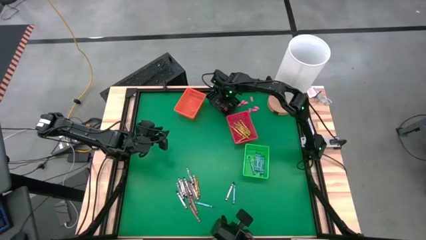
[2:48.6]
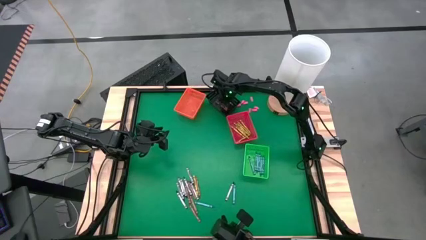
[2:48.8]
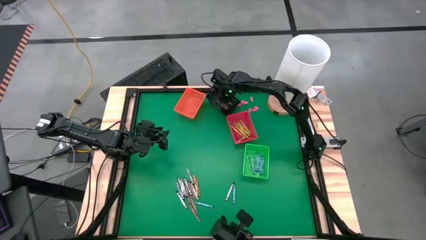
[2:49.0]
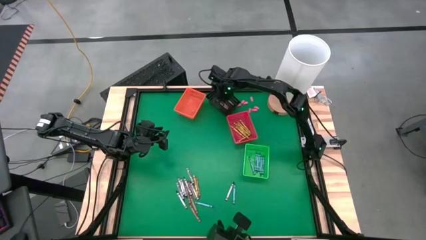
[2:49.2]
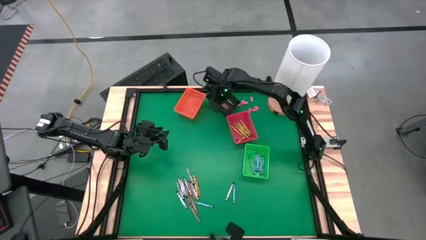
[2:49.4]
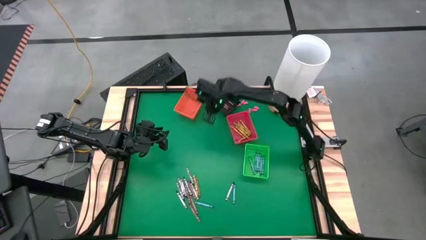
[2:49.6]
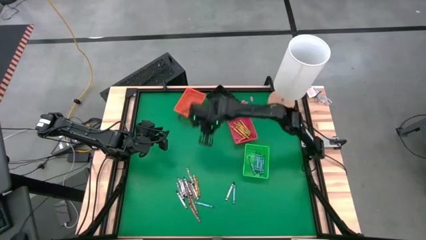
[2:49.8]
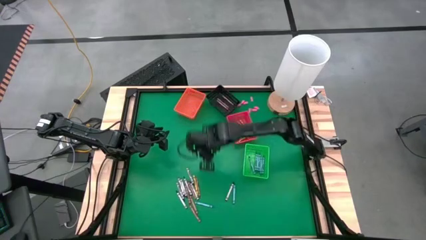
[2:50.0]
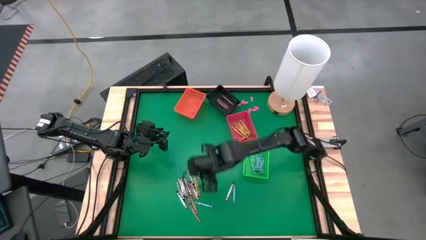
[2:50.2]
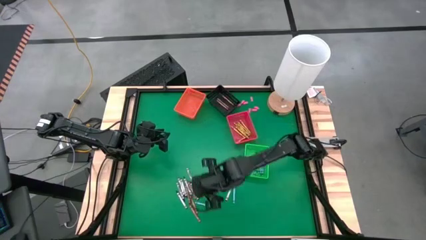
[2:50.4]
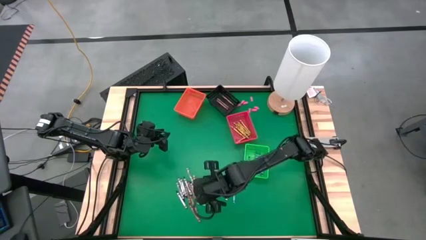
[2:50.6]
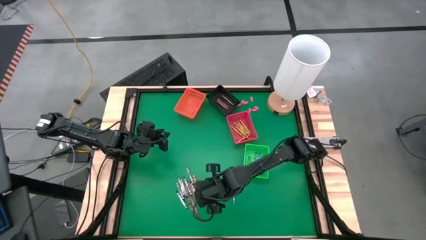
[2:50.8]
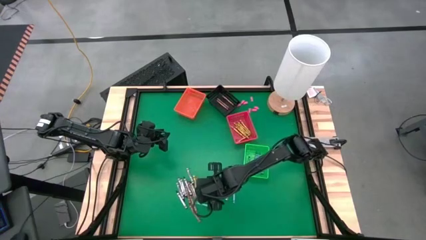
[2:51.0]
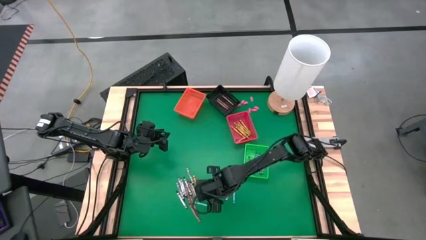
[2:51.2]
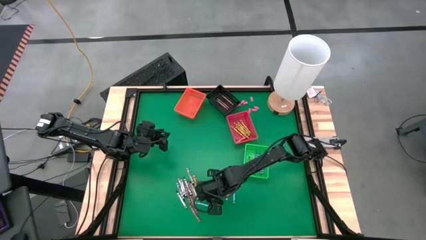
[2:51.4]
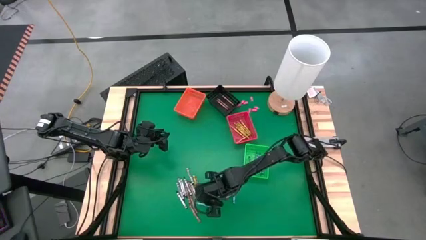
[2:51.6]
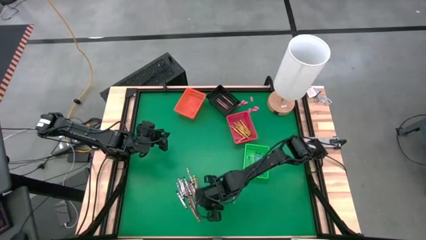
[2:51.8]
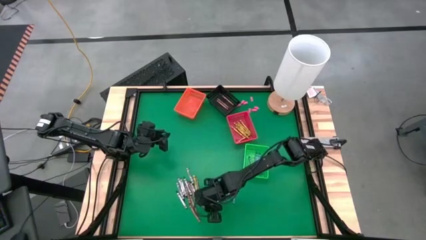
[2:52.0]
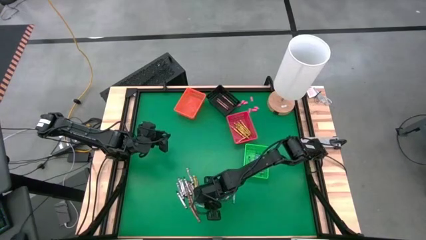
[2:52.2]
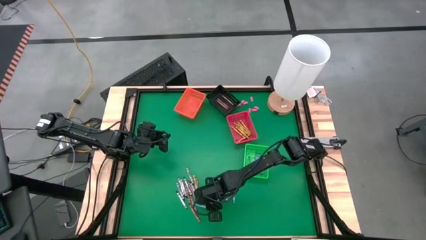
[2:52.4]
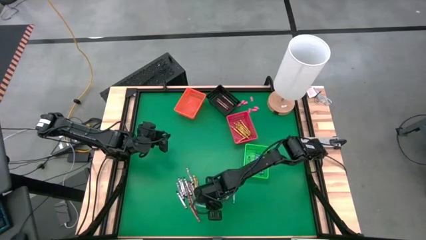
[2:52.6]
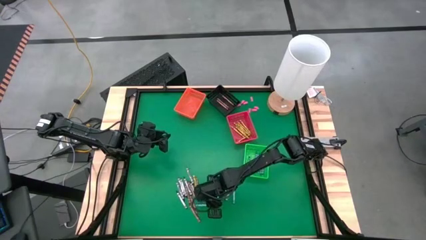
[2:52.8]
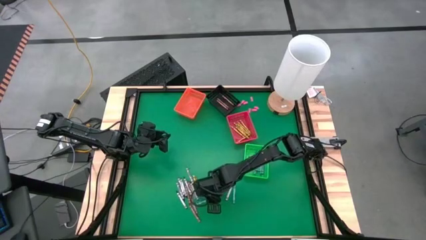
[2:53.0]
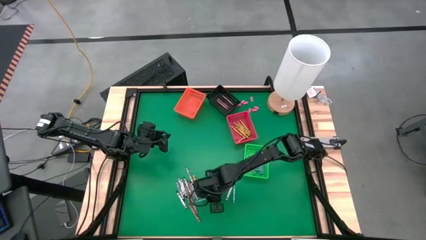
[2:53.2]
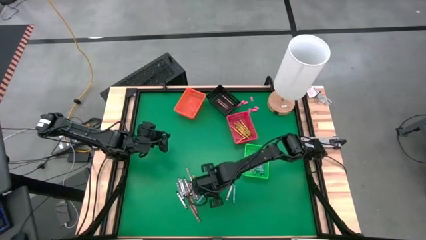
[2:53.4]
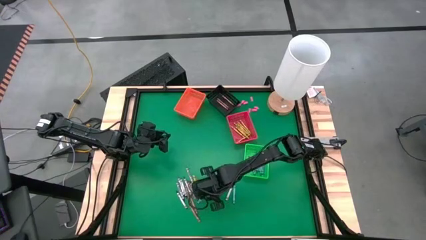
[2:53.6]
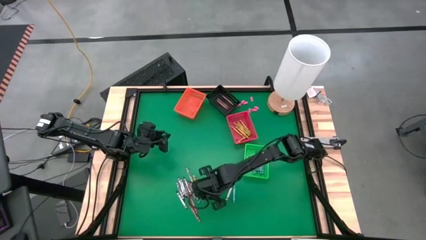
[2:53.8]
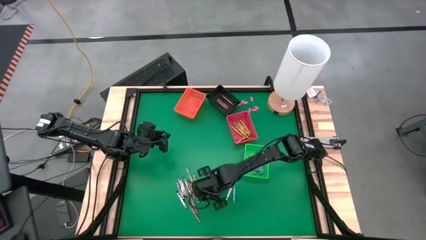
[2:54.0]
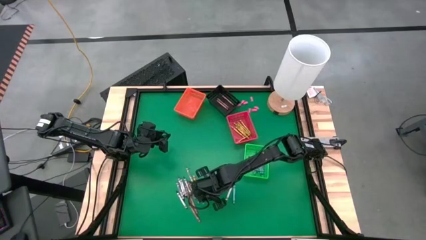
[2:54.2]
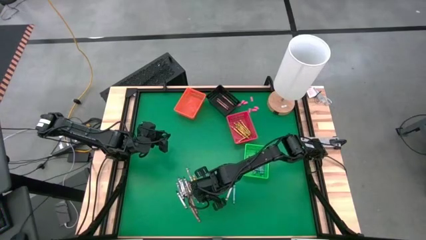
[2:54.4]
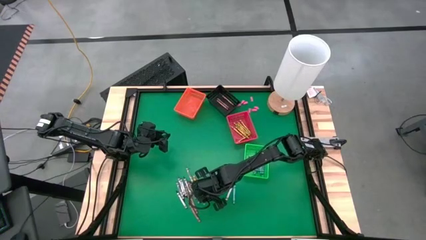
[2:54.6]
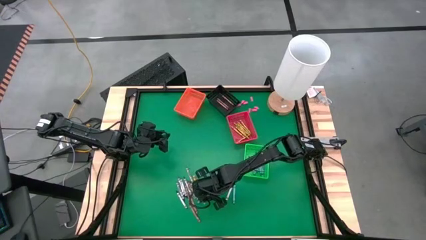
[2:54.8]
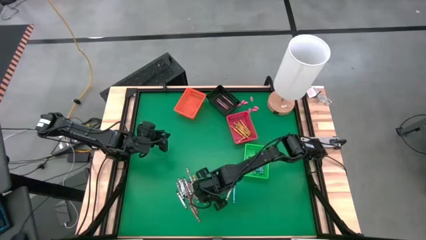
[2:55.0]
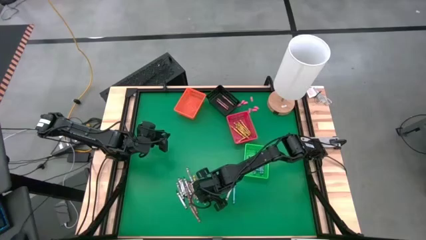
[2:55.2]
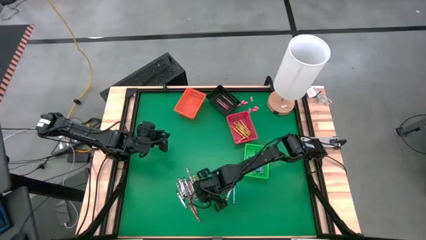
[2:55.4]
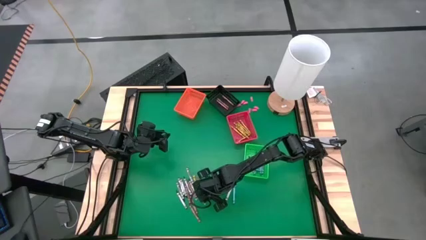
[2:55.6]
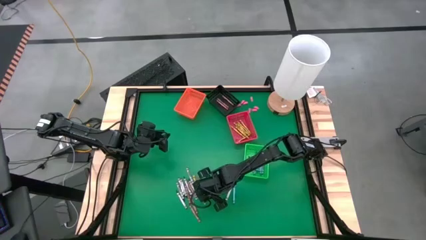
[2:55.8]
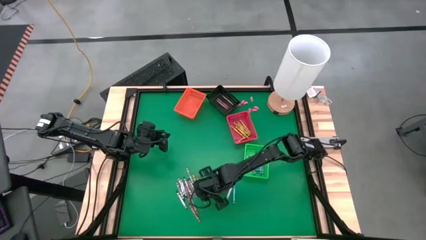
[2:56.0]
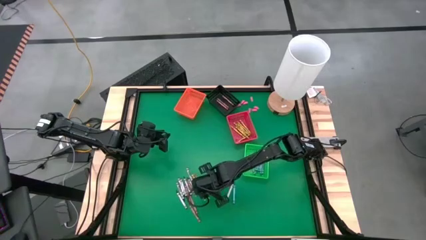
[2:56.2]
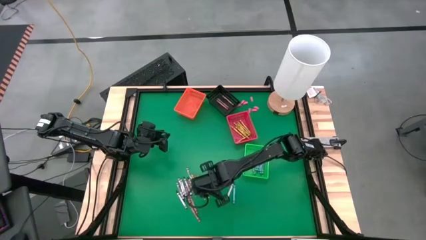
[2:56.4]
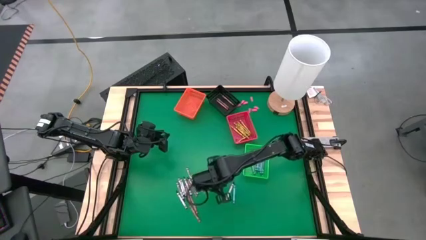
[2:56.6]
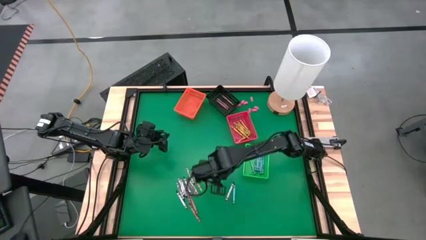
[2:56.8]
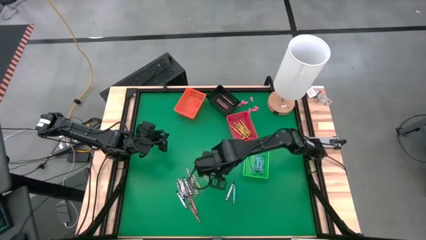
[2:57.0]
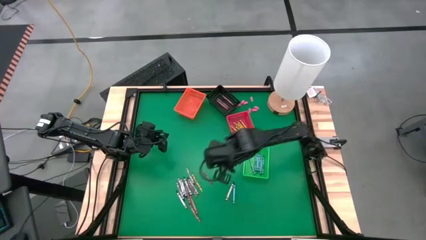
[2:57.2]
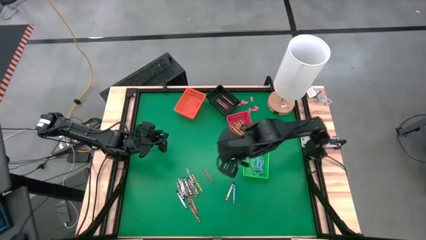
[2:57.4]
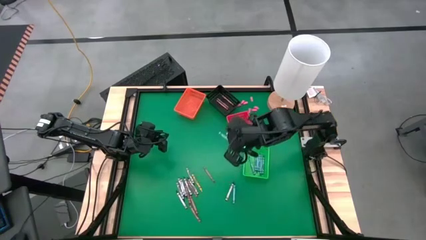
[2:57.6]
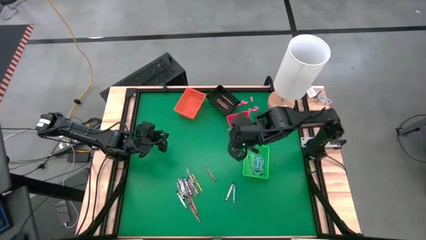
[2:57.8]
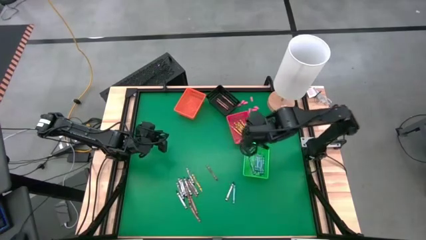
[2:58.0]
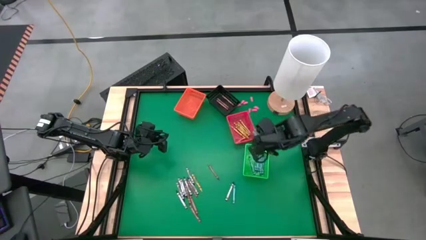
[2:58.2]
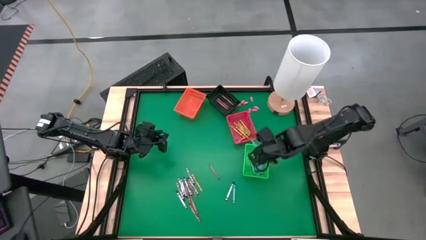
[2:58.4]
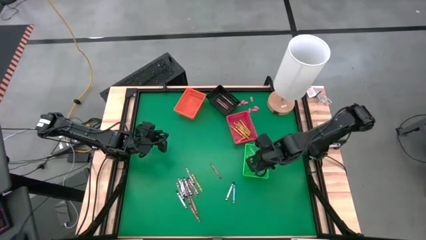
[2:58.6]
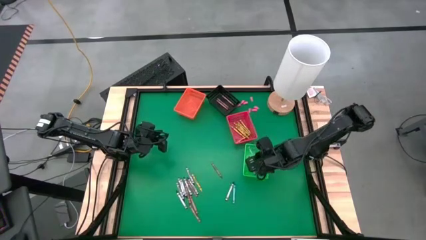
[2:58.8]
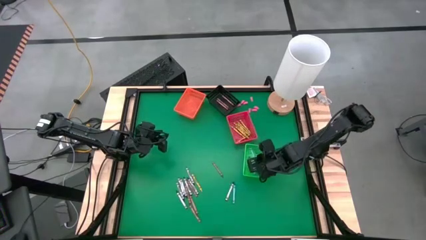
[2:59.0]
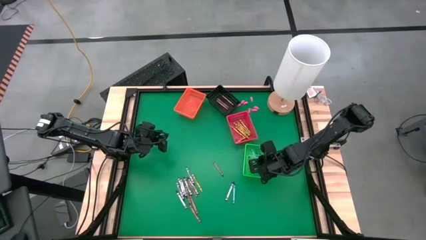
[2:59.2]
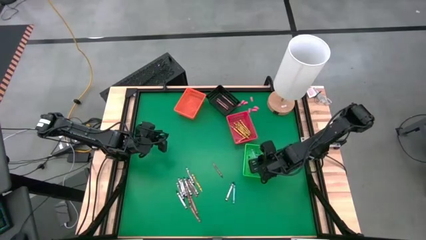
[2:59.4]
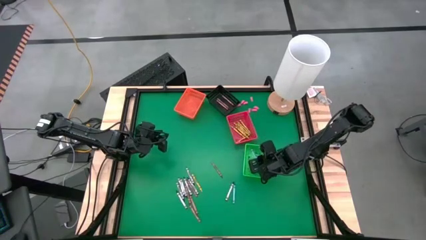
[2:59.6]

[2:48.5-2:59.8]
Task: Sort crayons
Put the light blue crayon into the green bin
